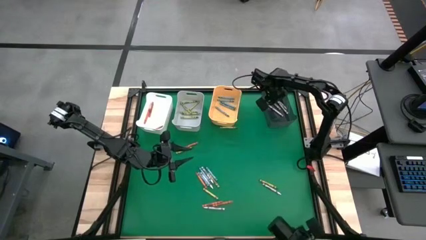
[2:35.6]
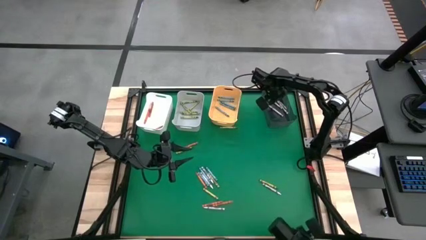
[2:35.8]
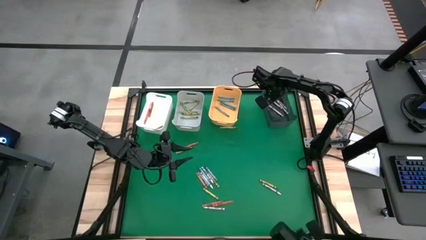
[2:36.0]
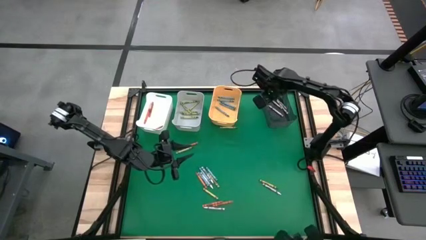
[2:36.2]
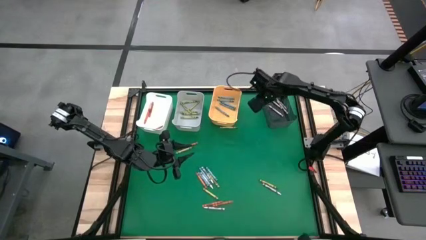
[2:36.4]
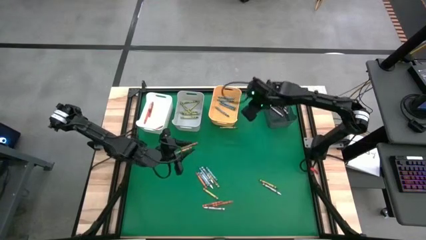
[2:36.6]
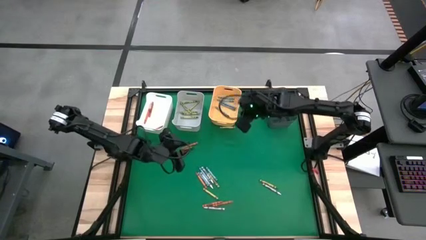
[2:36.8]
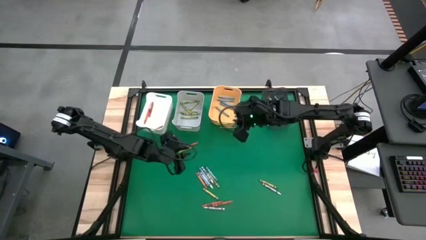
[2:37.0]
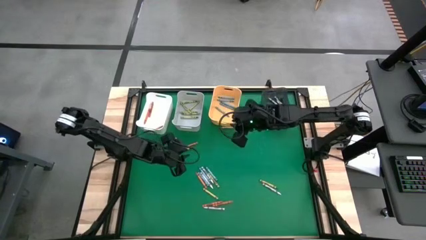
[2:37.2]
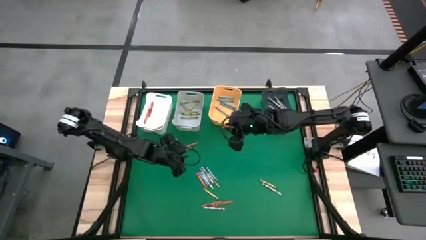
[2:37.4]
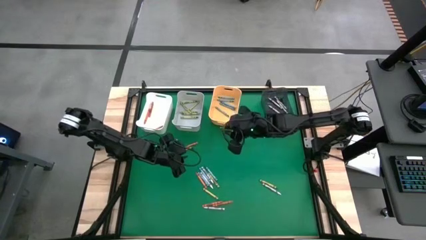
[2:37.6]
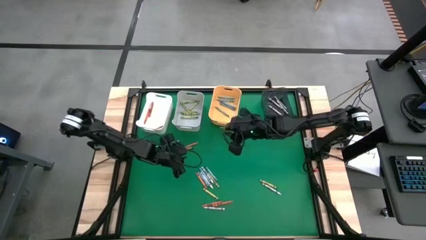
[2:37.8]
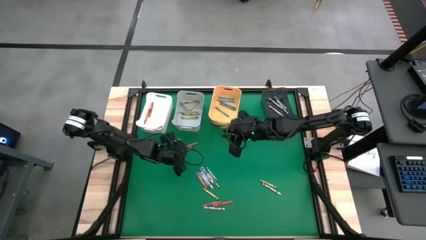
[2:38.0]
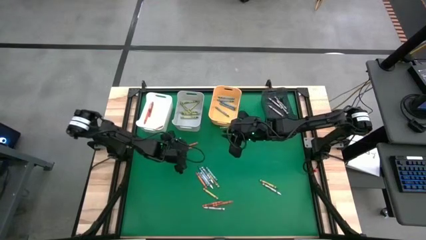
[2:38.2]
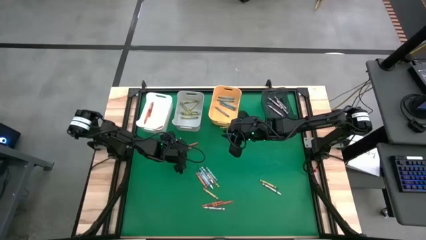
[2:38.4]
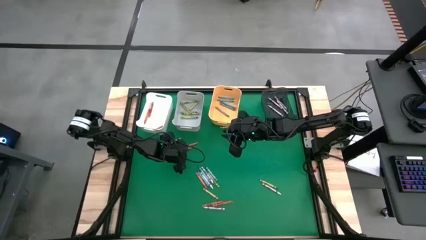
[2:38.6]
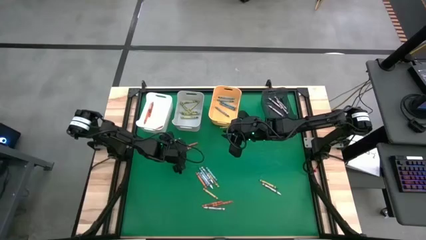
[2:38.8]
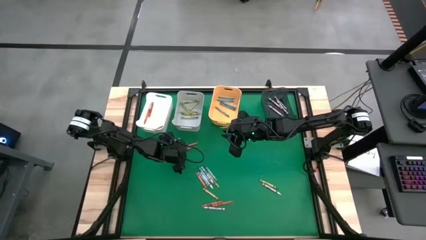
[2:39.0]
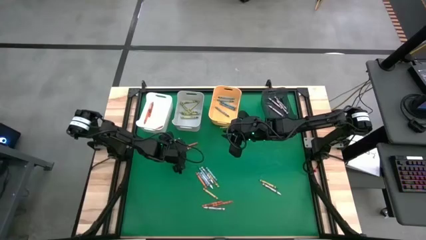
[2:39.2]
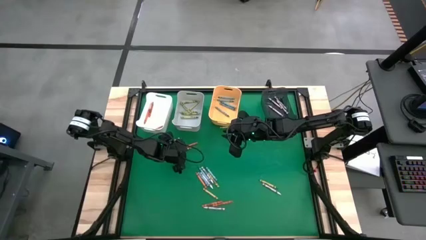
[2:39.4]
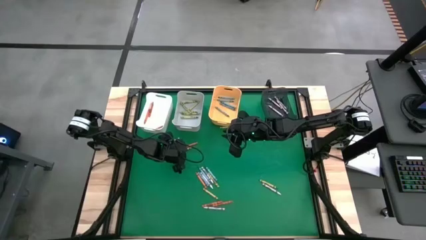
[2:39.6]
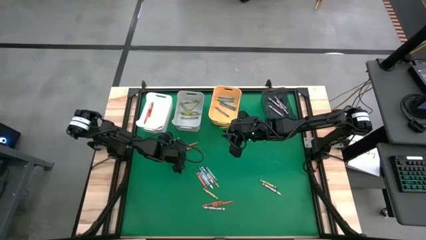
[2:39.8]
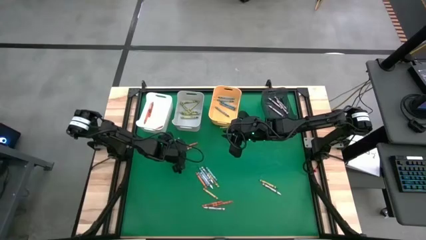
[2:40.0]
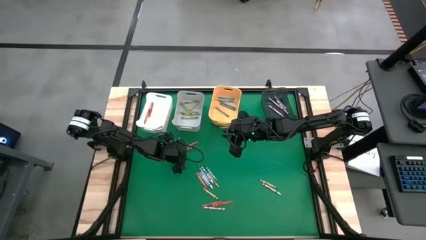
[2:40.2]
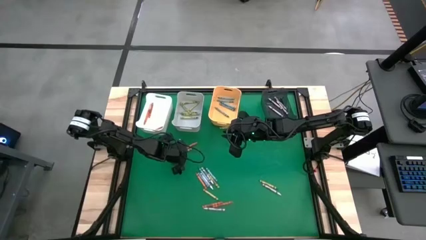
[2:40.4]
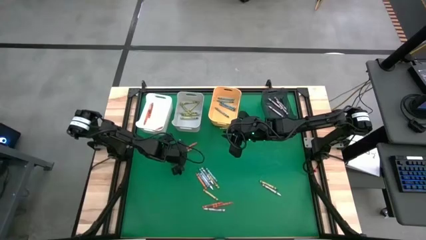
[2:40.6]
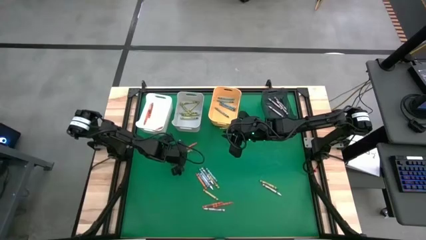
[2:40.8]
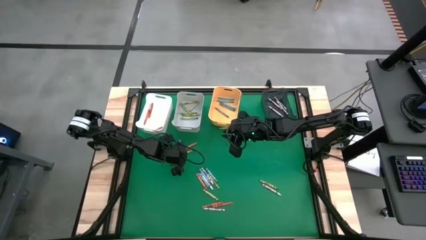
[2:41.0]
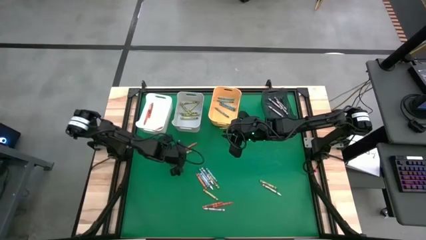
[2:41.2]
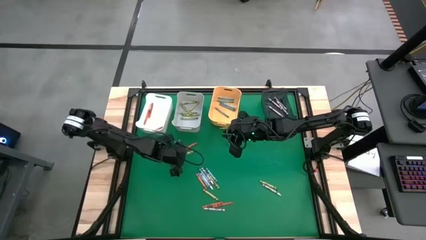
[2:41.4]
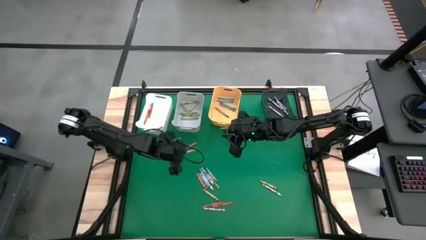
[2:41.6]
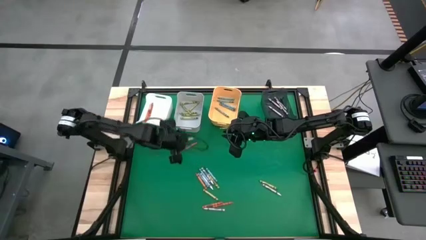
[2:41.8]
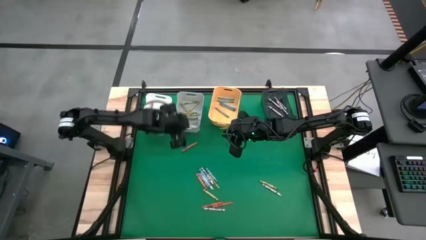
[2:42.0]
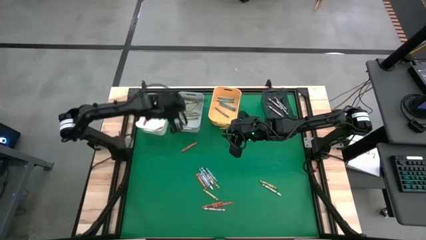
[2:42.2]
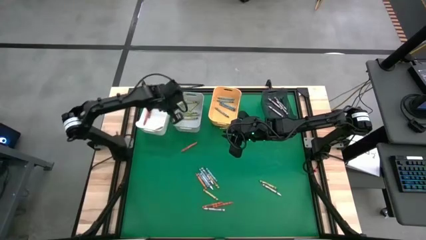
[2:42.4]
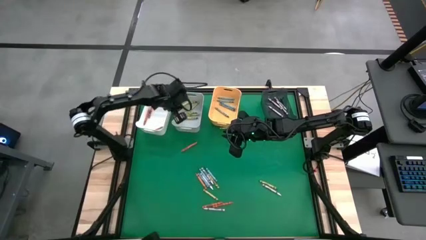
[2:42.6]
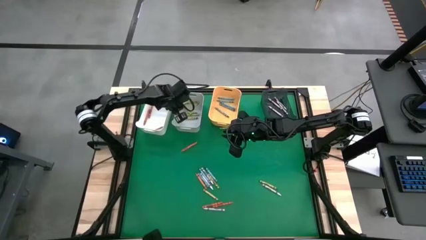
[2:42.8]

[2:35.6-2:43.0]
Task: Sort crayons
Put the green crayon into the gray bin

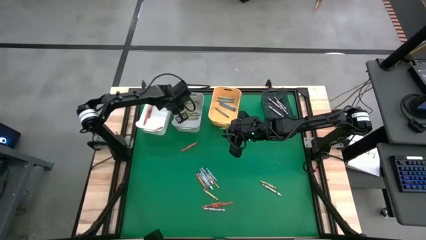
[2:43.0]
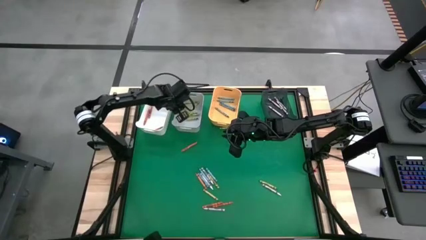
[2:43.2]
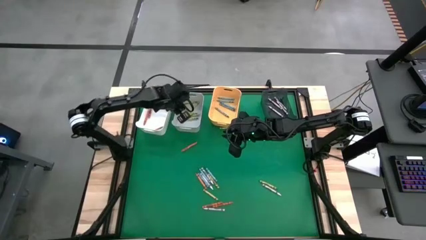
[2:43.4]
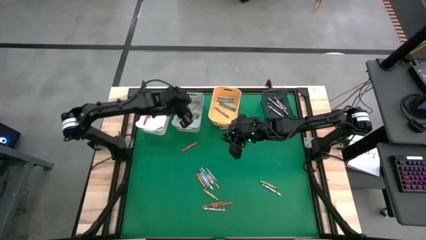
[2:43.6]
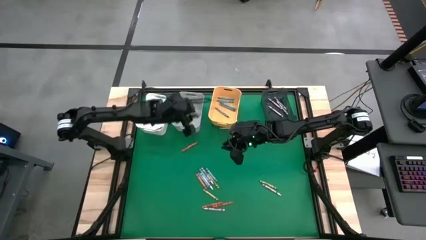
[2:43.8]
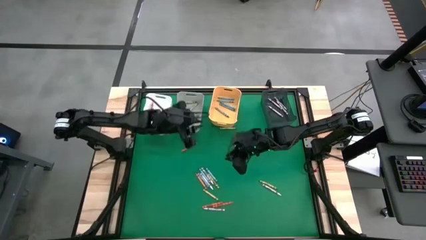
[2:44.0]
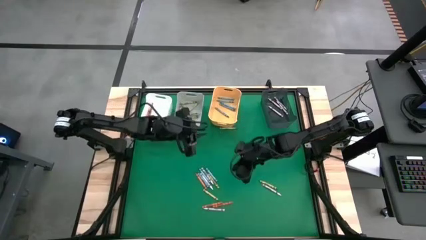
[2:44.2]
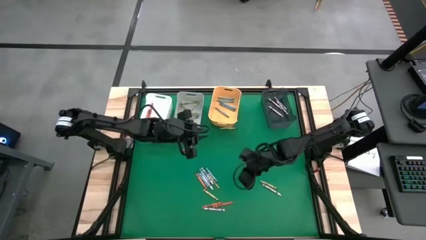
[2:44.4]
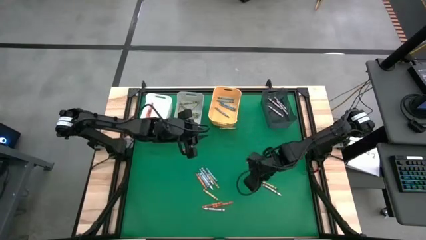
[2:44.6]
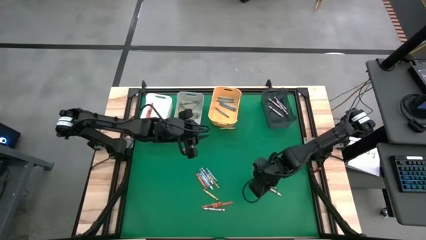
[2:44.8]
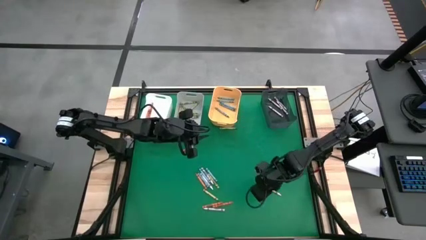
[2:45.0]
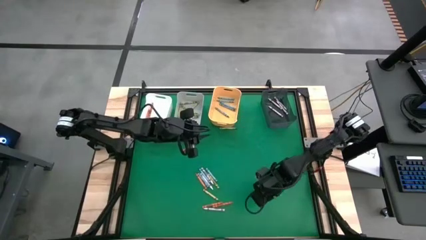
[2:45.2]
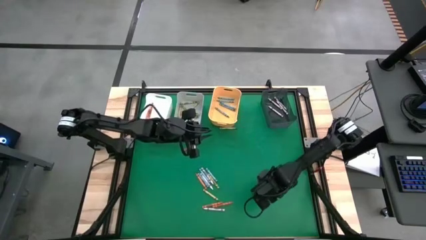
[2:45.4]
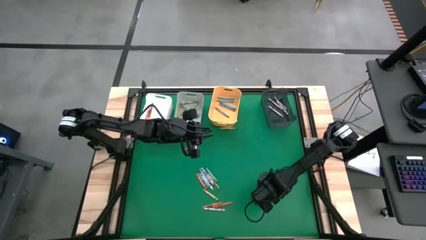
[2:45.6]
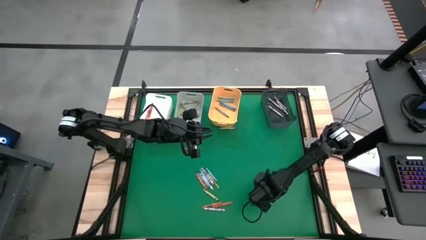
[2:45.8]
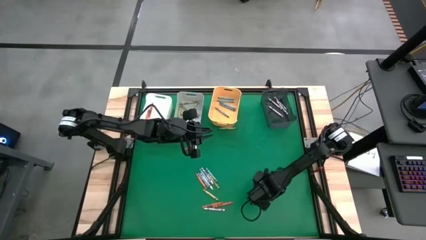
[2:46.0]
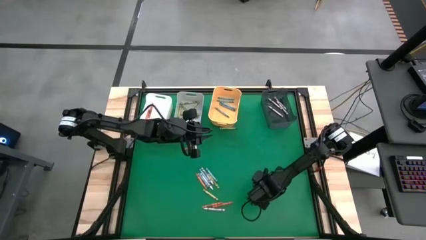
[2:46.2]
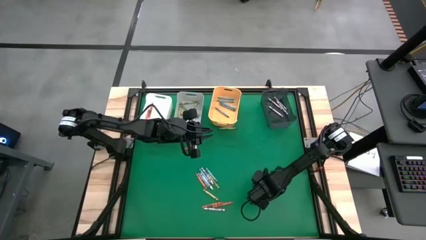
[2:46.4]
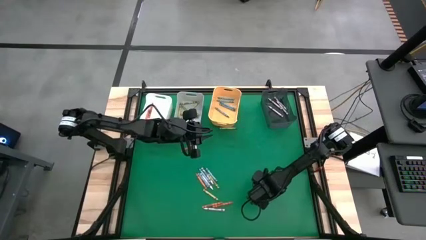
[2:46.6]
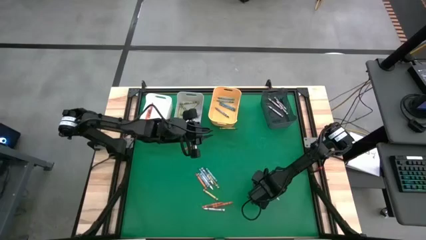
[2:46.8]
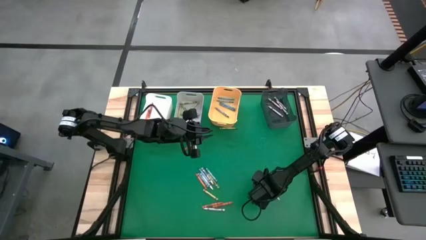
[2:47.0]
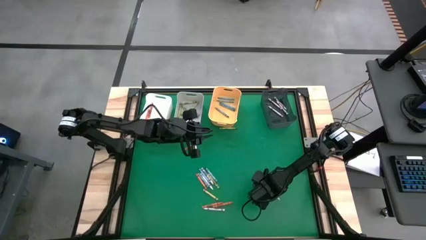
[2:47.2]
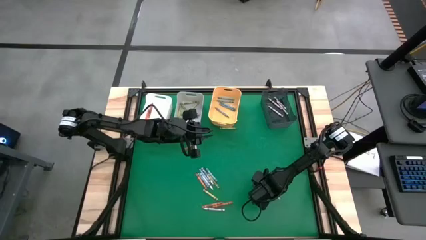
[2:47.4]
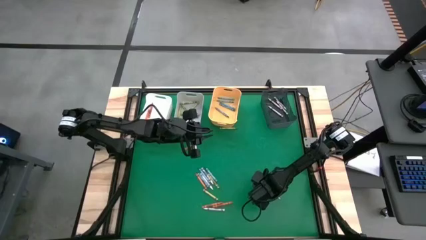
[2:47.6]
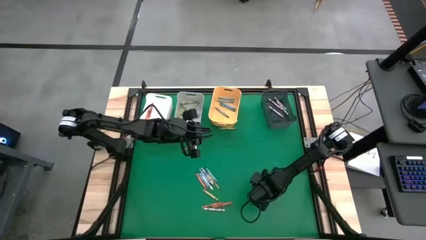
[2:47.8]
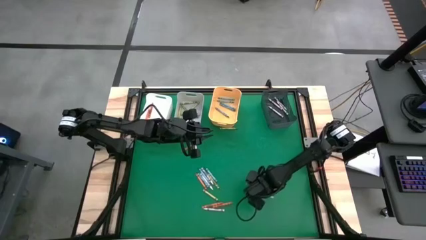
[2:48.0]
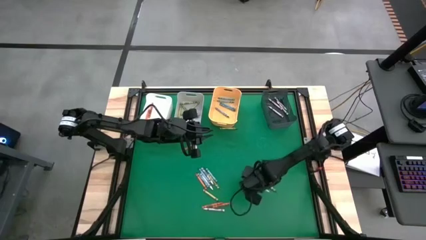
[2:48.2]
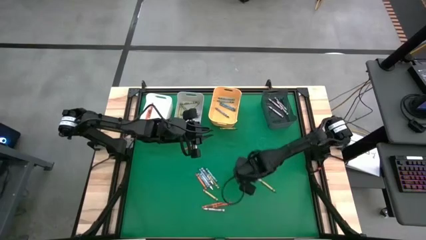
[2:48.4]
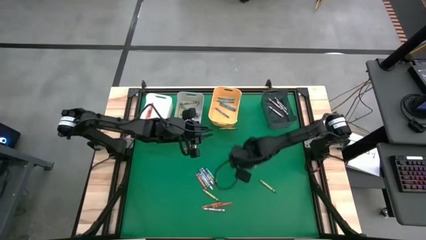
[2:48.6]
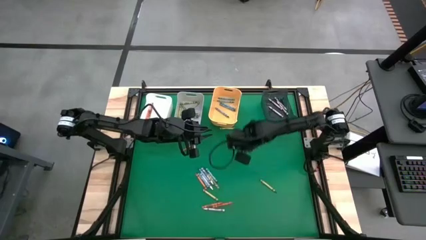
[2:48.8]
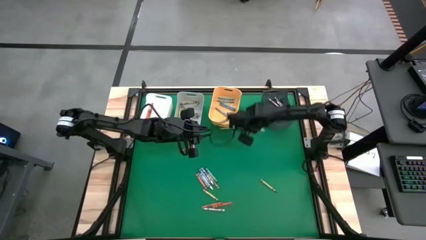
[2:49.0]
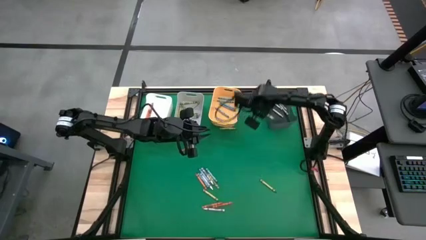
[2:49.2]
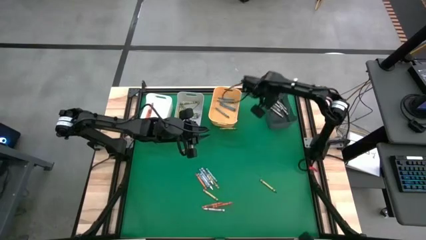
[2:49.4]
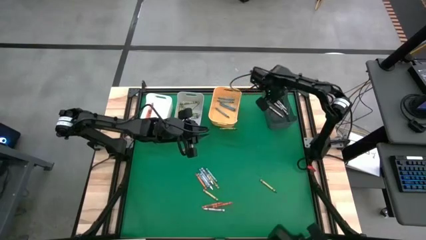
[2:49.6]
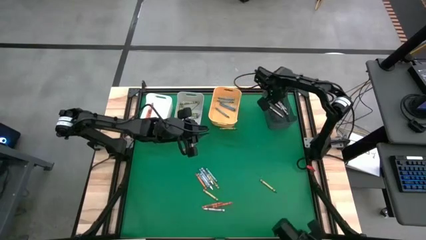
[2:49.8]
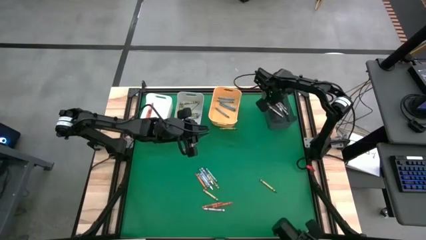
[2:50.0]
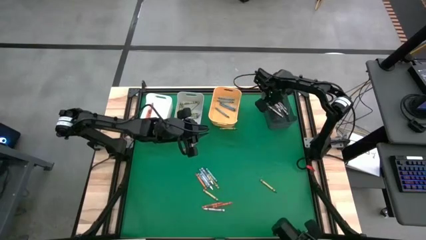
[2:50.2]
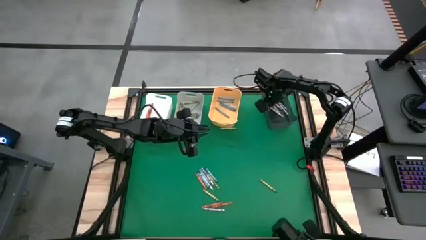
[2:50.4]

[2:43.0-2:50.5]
Put the white crayon into the black bin
